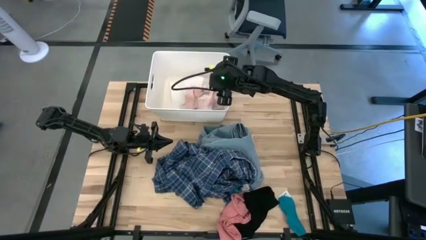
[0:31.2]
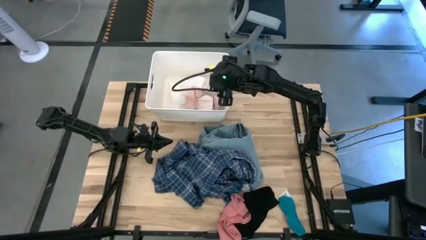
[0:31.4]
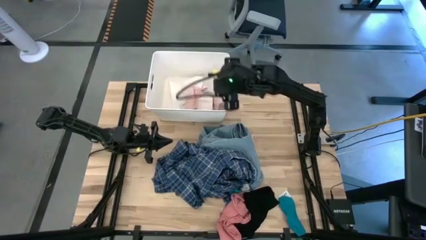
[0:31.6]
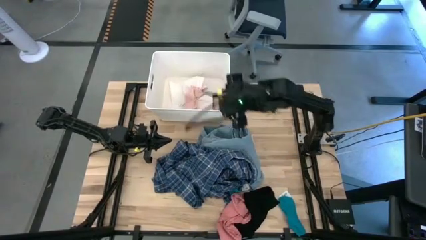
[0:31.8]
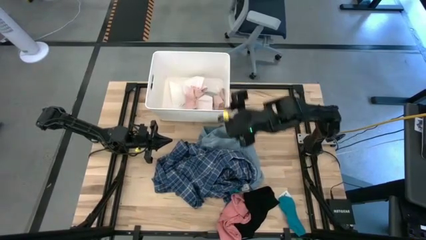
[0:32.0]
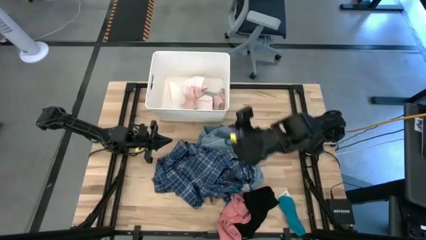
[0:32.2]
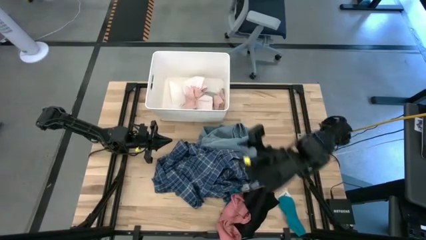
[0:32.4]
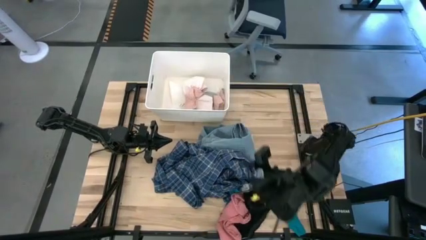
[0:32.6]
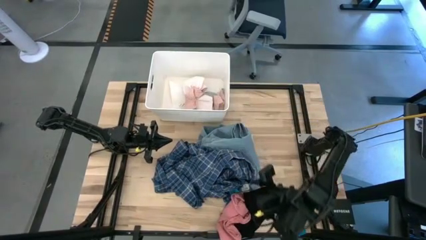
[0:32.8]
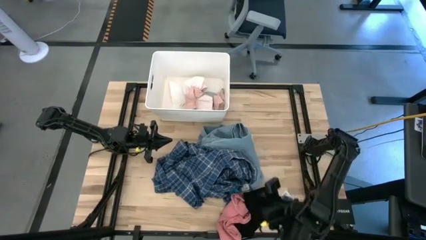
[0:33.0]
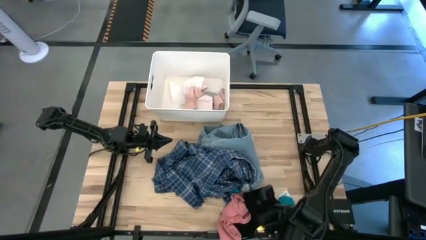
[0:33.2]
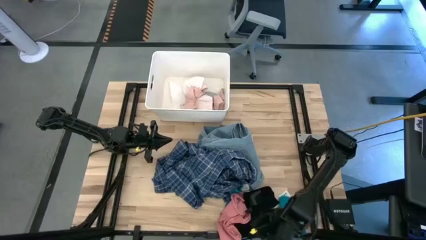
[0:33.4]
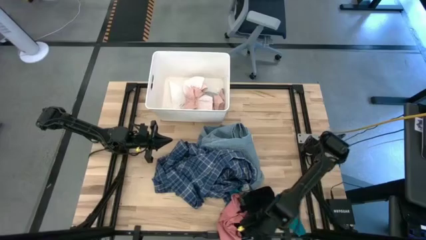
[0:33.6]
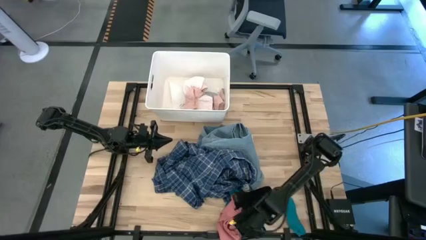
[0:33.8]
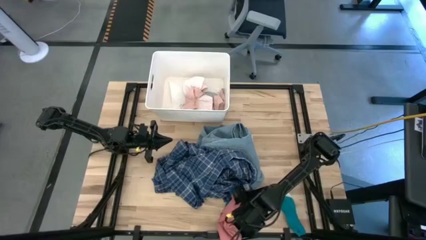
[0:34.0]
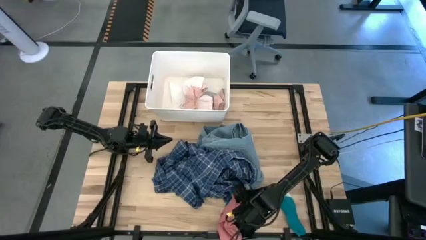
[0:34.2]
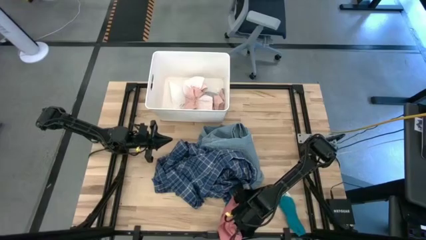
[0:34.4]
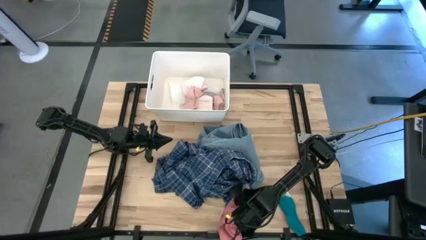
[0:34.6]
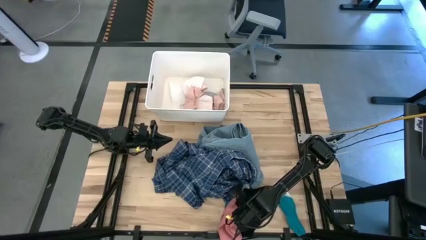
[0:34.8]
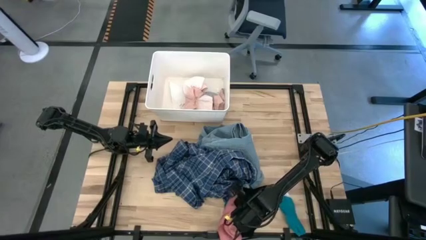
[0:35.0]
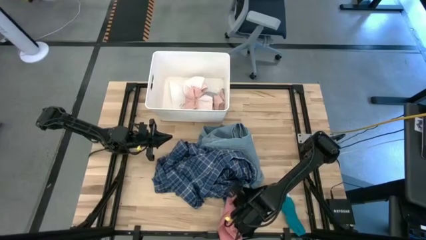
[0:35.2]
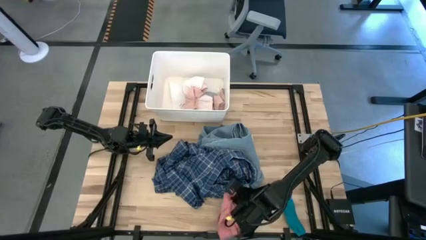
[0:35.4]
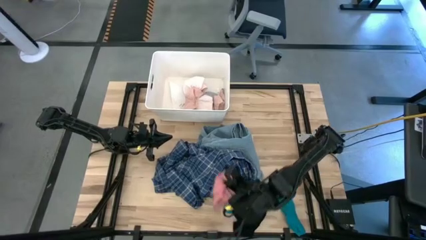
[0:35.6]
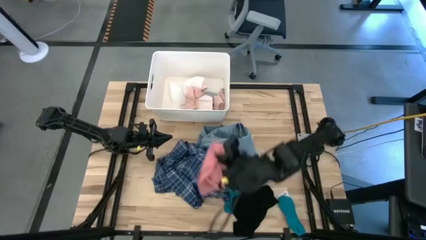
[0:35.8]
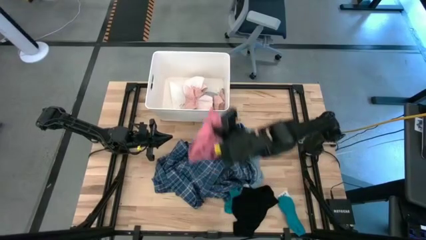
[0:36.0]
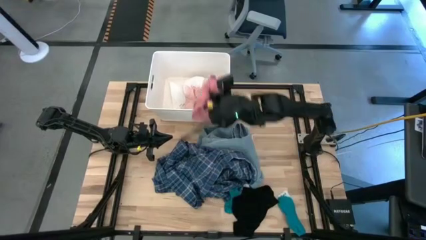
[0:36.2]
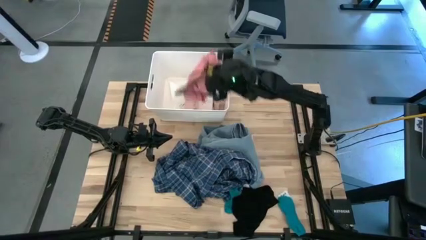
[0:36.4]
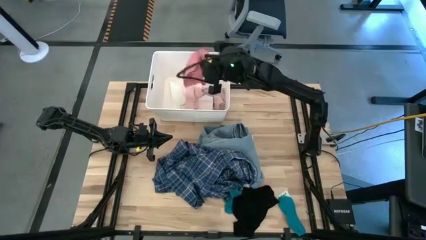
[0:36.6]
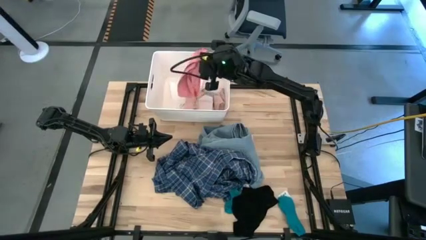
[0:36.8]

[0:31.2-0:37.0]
Task: Sort clothes
Put the pink underwear into the white bin

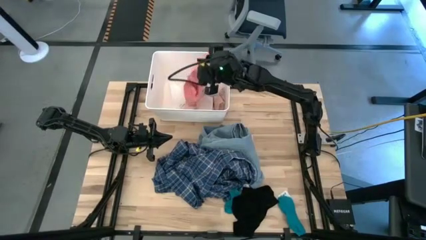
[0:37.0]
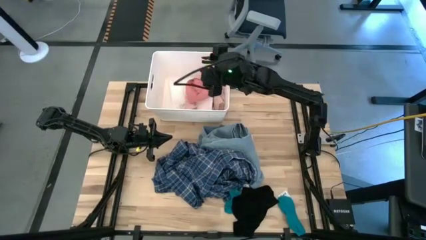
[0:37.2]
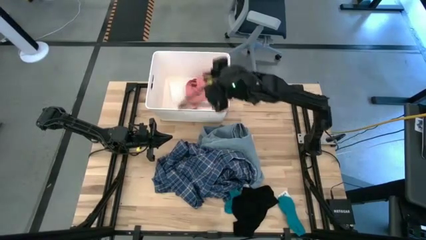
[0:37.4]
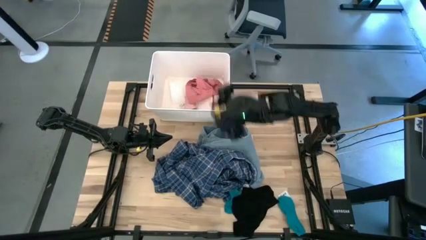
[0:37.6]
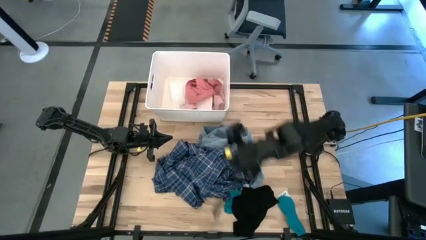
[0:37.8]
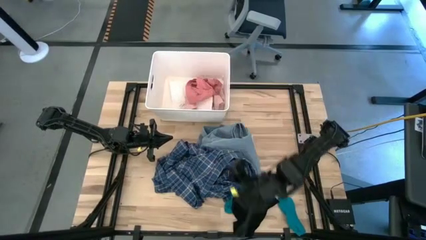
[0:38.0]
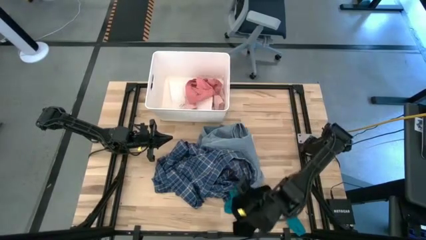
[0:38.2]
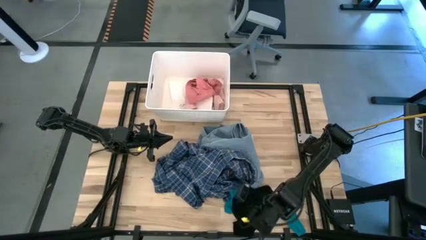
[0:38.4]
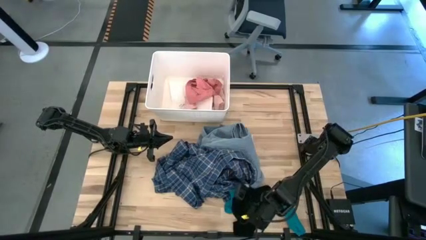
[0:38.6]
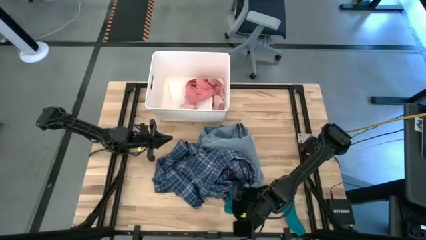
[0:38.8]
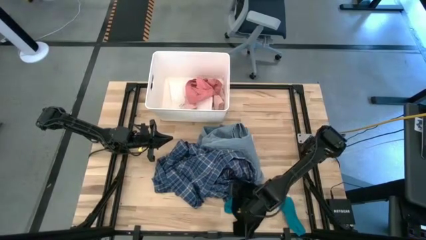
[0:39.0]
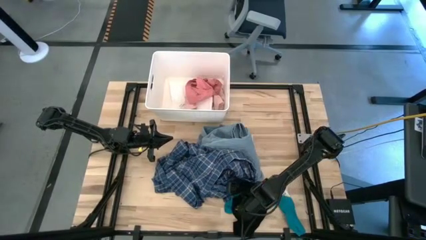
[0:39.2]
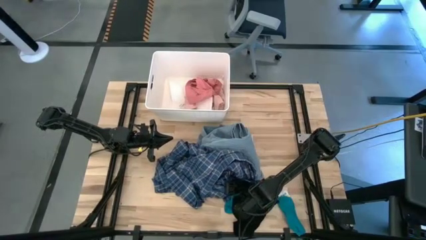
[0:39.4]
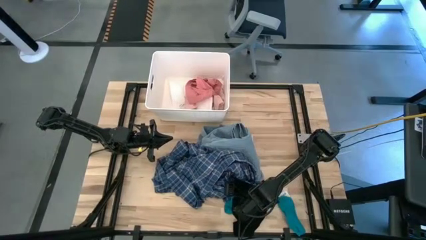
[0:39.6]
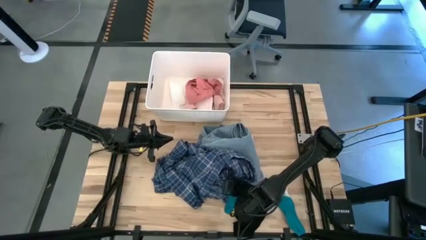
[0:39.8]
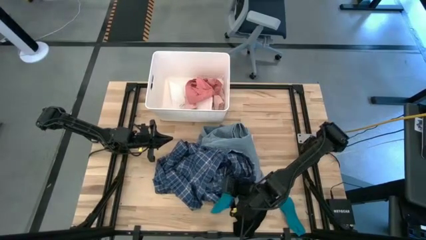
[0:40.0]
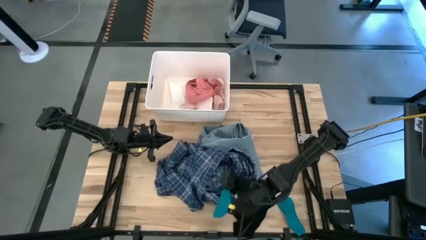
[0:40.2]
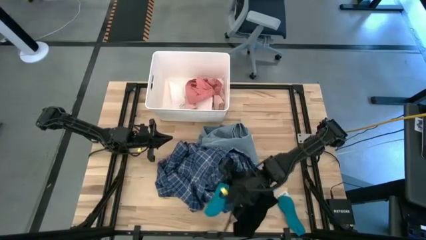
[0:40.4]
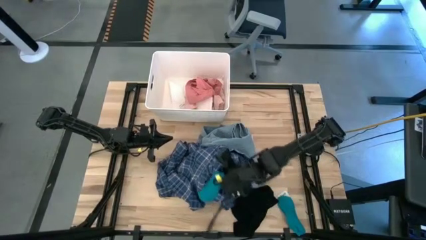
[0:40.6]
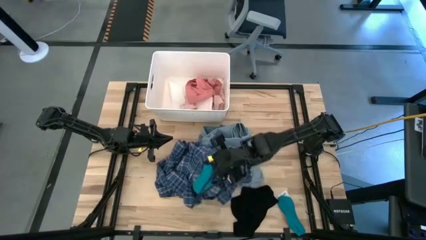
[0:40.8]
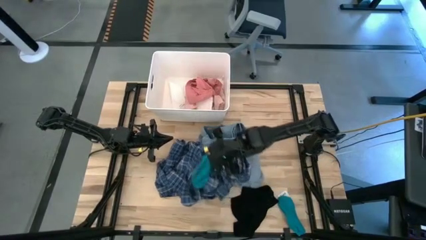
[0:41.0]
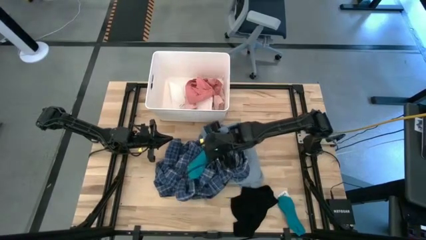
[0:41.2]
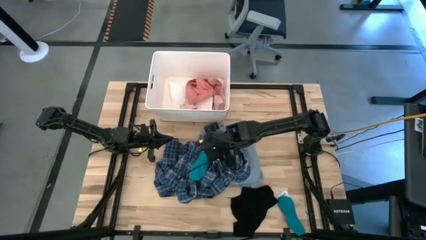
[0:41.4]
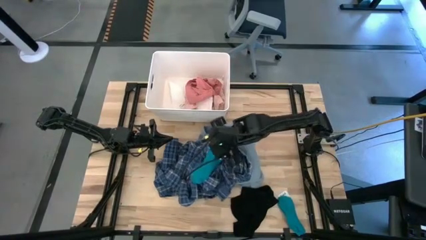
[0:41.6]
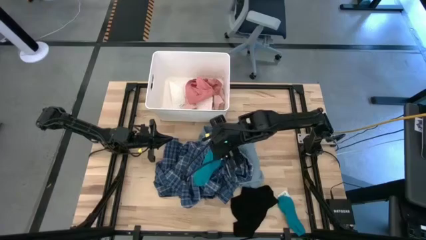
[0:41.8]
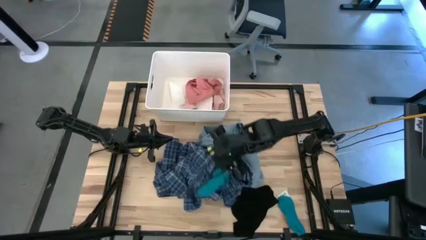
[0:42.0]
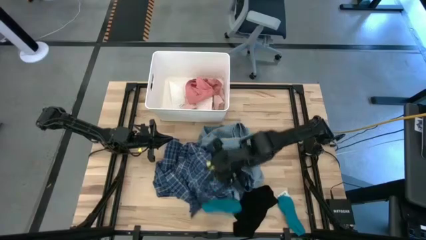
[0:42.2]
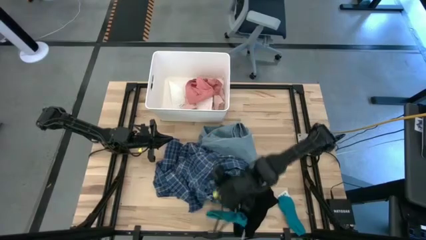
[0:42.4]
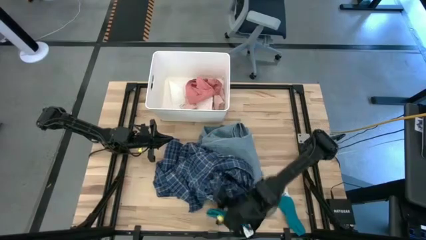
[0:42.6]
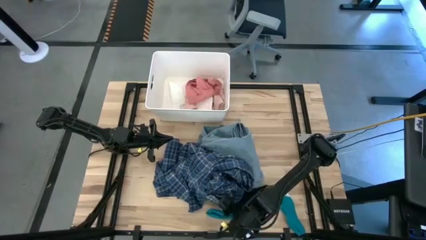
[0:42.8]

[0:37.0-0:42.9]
Put the left blue sock into the white bin

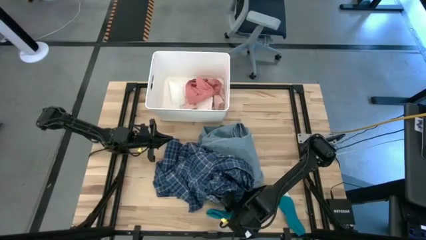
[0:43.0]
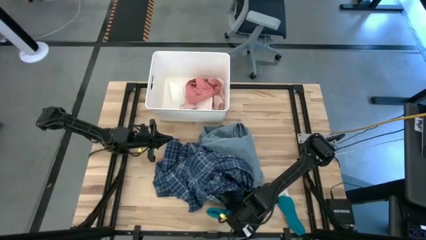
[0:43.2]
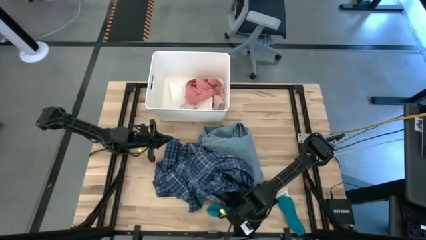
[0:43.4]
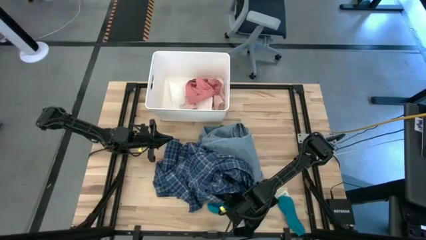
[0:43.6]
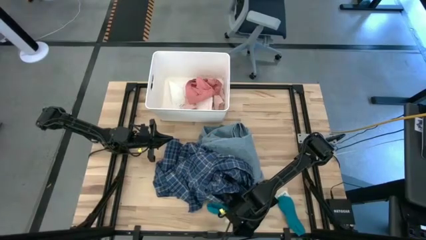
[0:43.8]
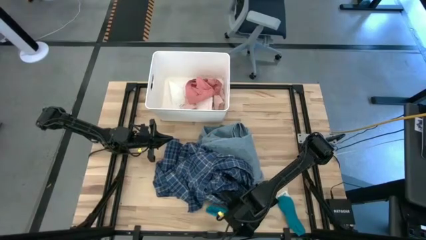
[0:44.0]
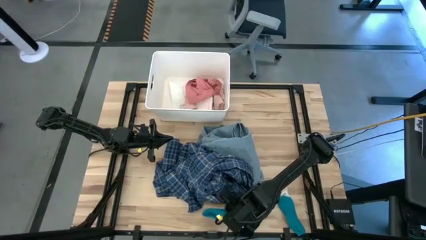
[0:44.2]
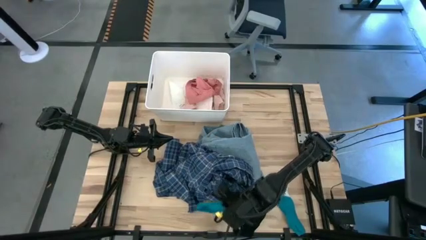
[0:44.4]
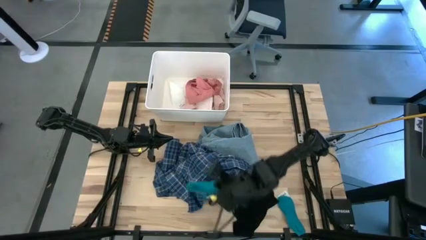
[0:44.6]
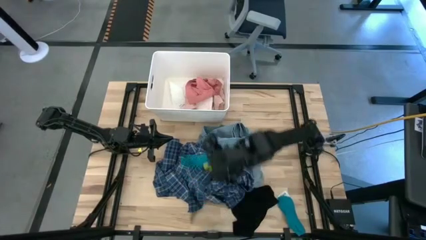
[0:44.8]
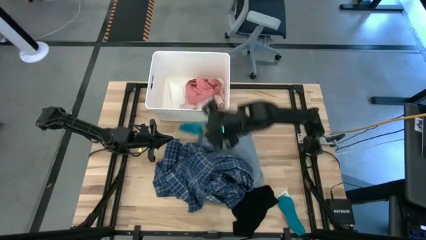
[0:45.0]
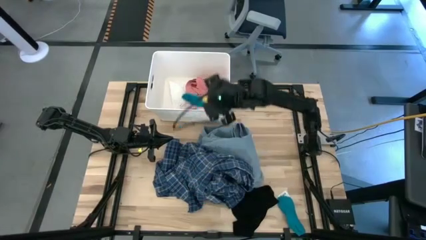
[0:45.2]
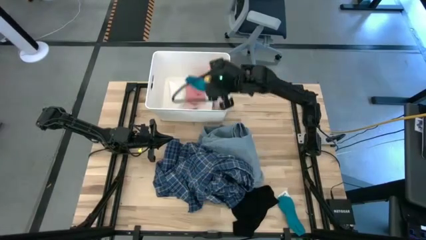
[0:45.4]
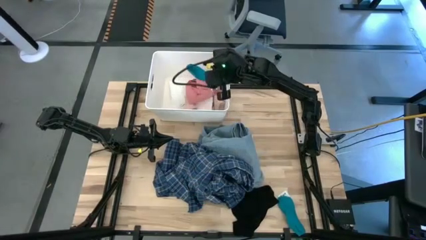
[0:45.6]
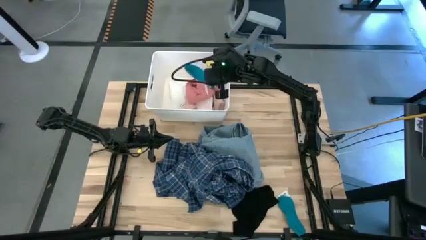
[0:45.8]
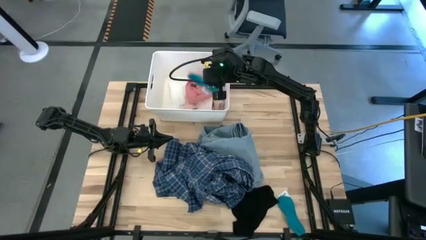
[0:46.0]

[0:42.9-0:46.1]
Put the left blue sock into the white bin

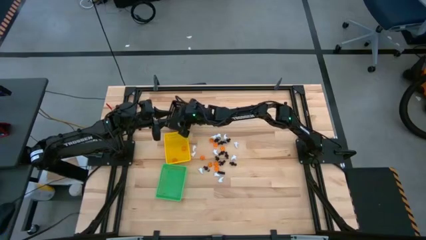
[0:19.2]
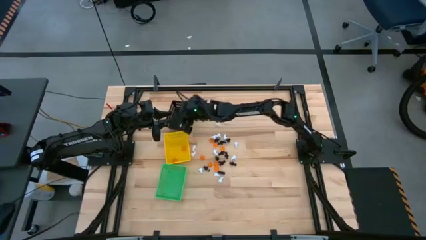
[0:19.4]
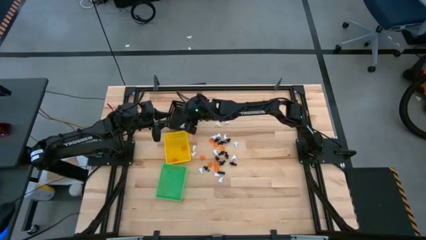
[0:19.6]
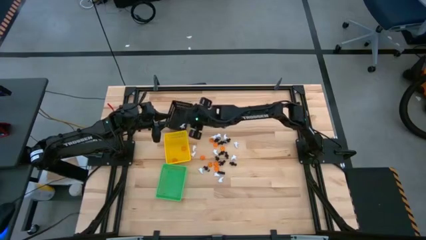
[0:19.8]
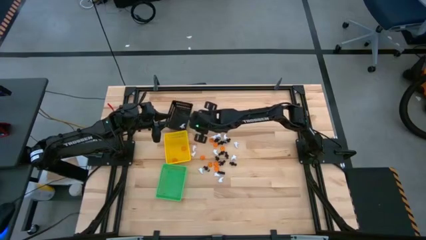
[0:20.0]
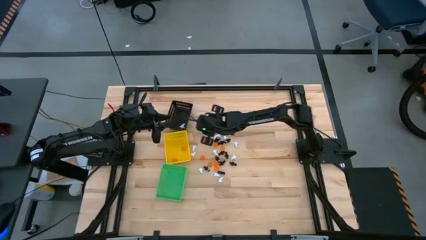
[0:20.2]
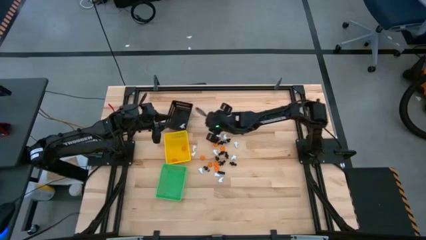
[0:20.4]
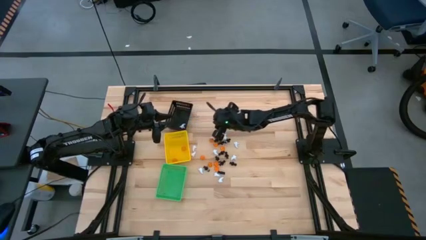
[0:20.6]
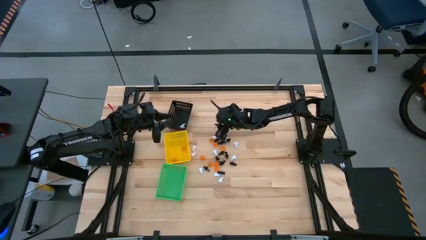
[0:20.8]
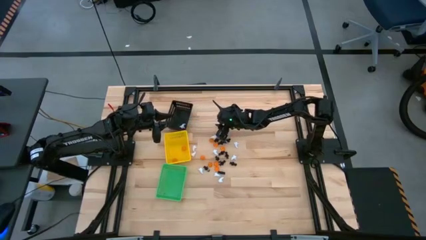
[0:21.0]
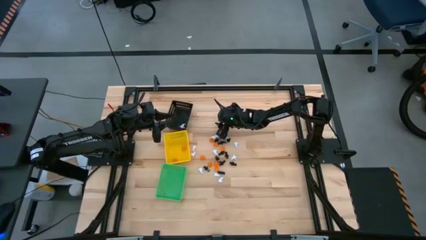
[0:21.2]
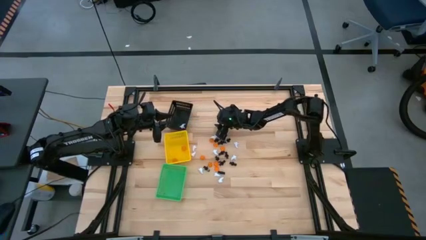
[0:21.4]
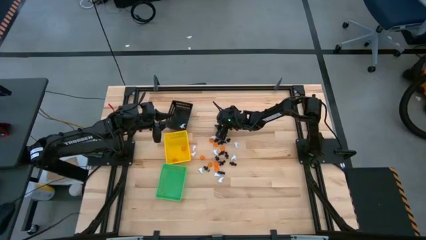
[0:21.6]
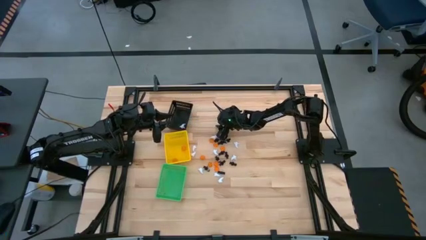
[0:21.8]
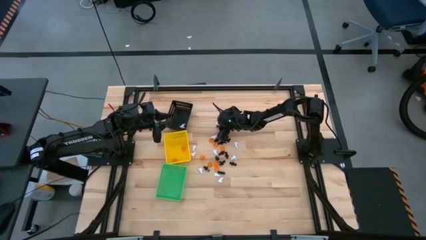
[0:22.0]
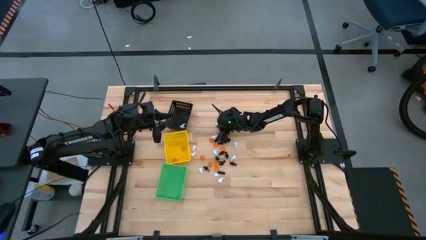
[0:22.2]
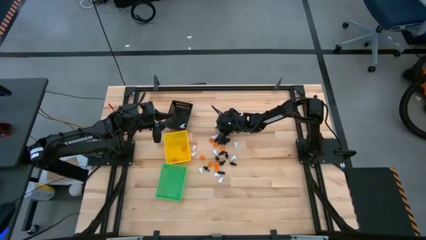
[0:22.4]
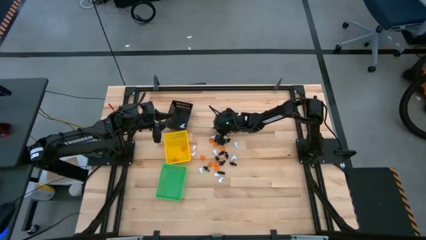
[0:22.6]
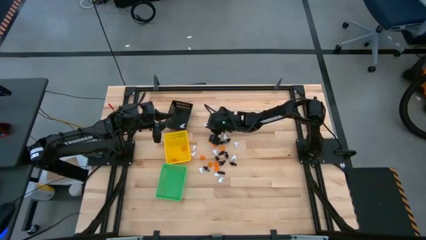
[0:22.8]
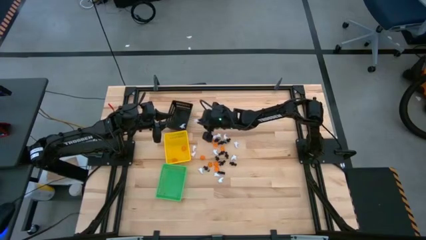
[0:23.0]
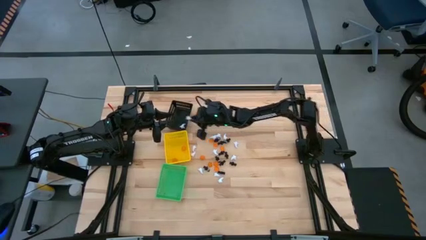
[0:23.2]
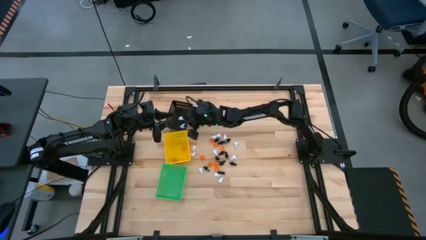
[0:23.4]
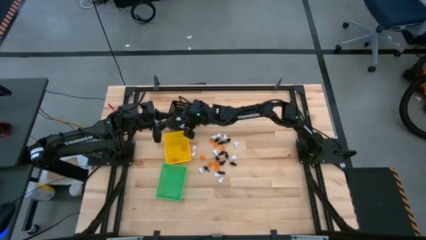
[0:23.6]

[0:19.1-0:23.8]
Task: Sort Halloween decoration
Put the white ghost plush toy into the black basket
